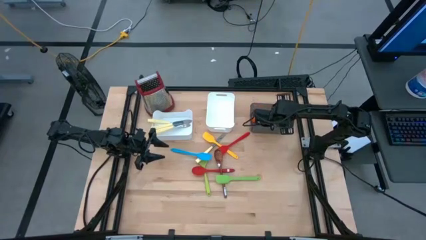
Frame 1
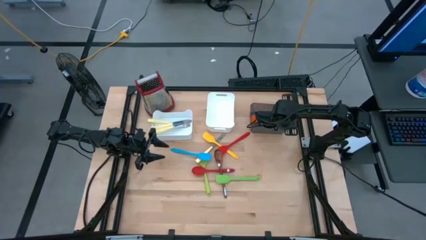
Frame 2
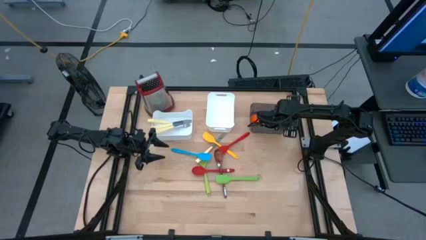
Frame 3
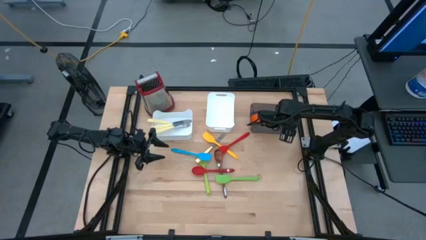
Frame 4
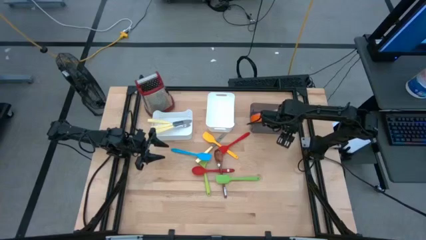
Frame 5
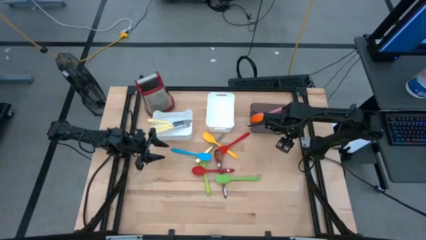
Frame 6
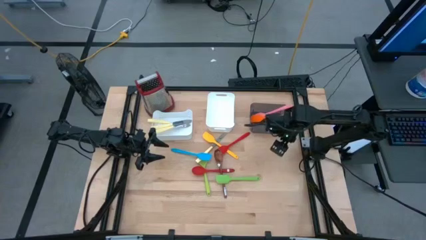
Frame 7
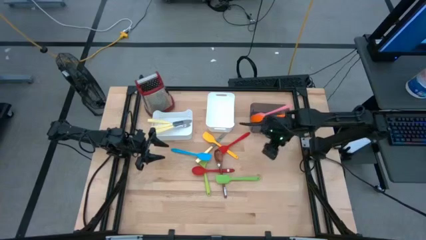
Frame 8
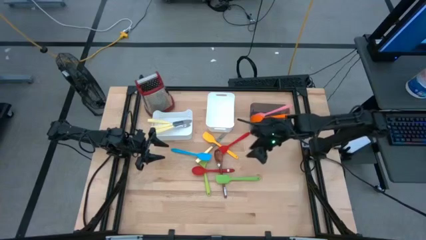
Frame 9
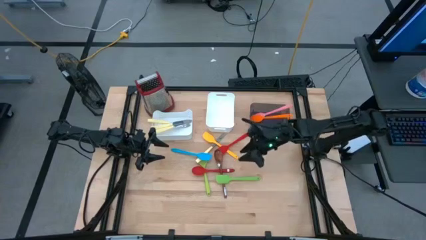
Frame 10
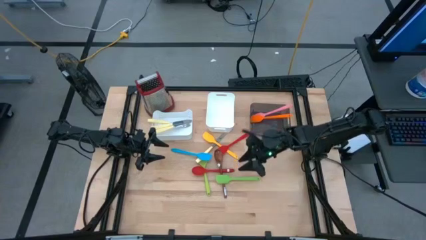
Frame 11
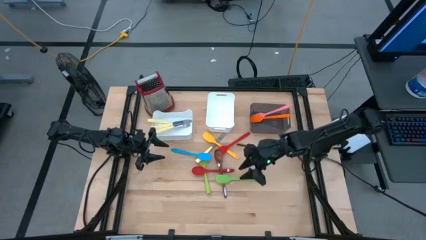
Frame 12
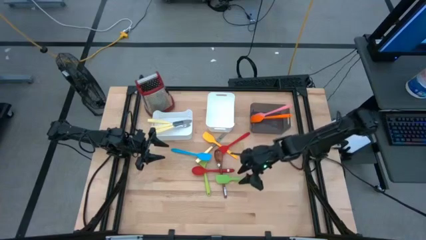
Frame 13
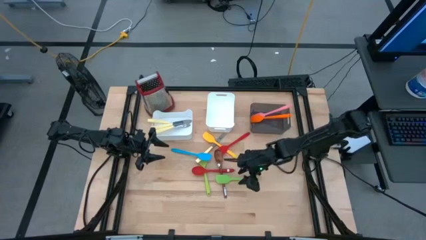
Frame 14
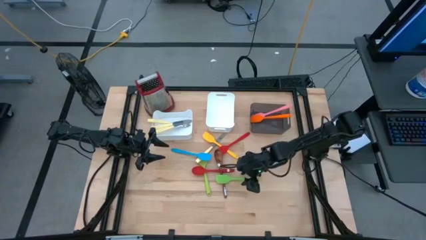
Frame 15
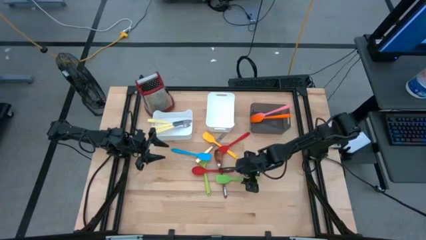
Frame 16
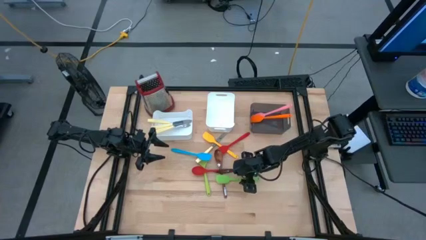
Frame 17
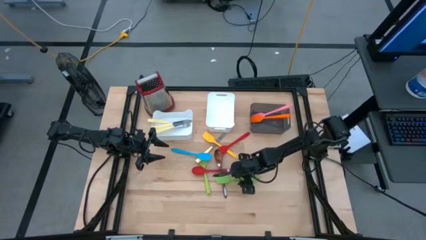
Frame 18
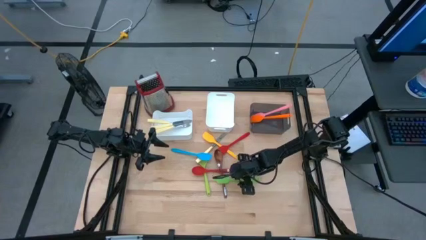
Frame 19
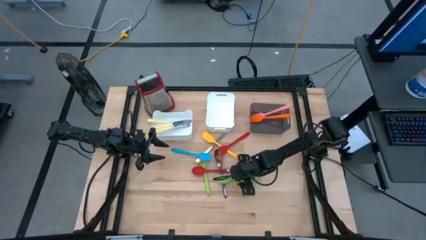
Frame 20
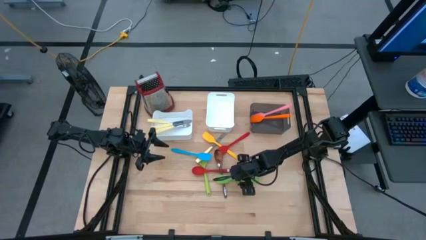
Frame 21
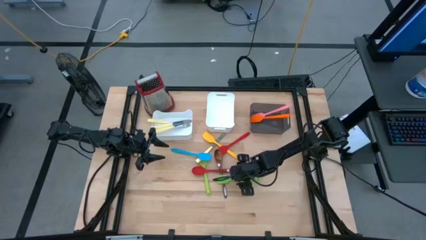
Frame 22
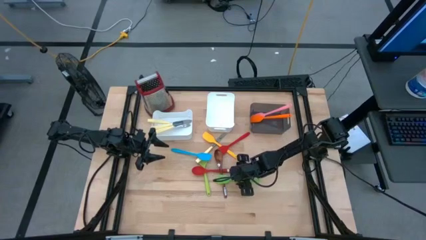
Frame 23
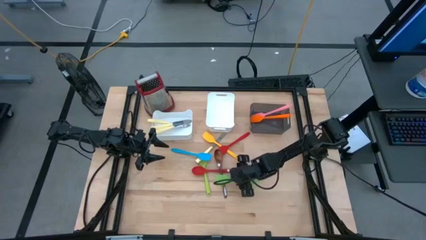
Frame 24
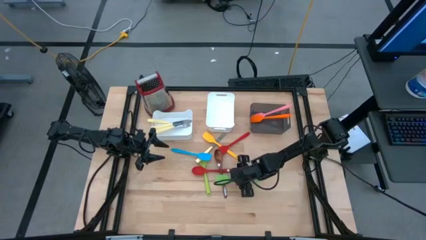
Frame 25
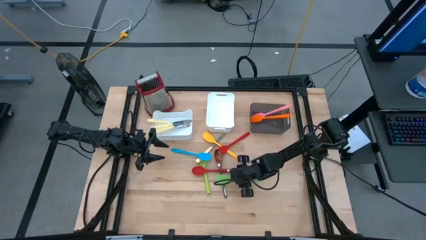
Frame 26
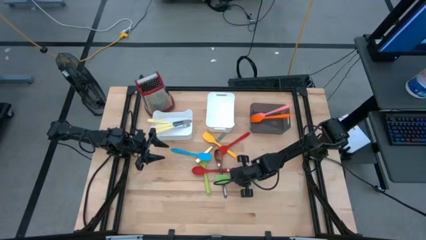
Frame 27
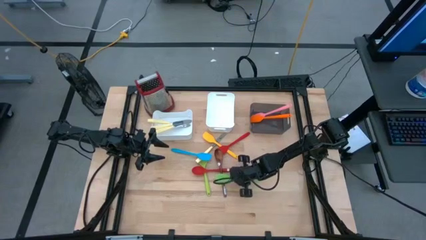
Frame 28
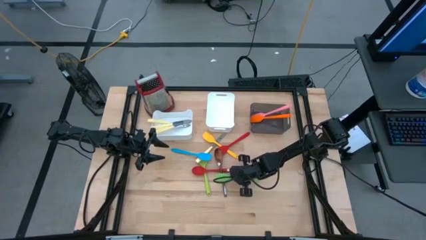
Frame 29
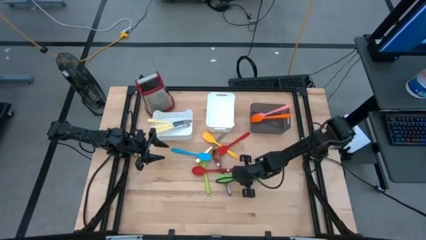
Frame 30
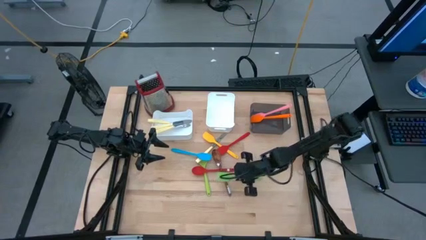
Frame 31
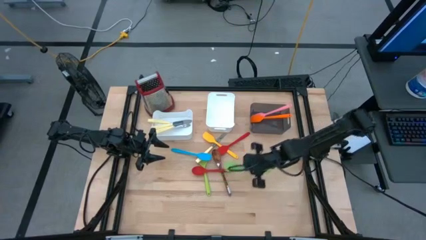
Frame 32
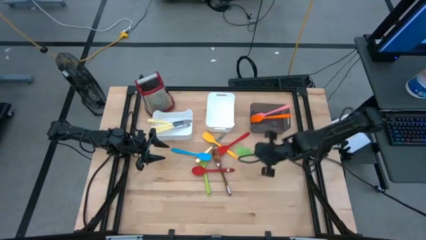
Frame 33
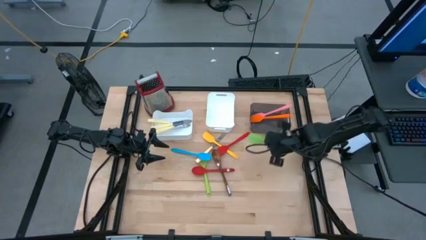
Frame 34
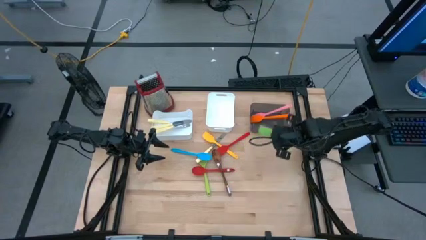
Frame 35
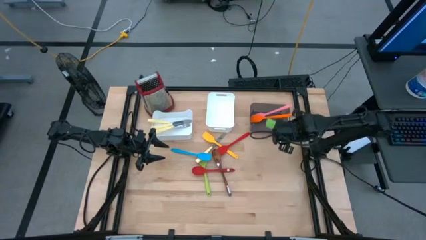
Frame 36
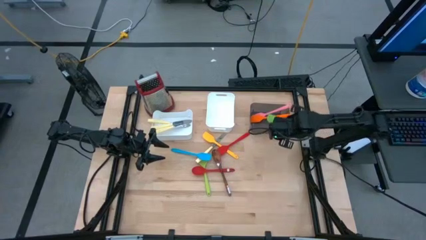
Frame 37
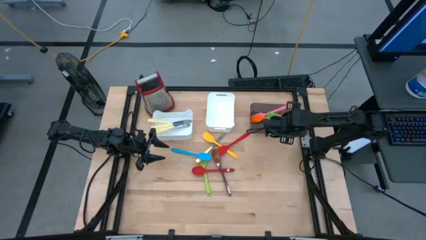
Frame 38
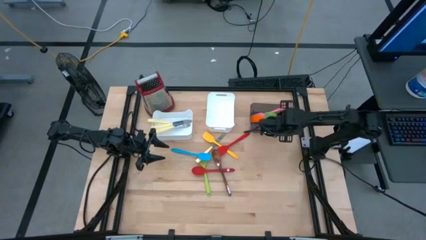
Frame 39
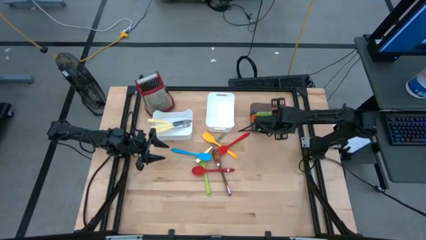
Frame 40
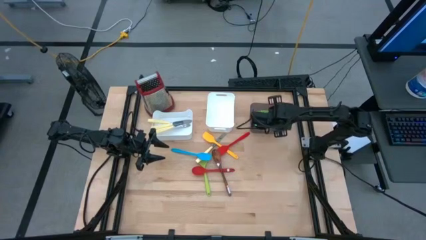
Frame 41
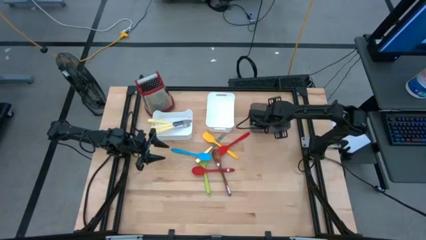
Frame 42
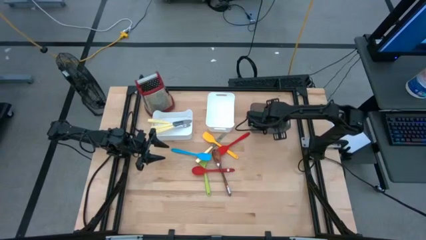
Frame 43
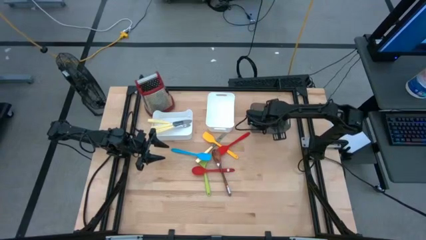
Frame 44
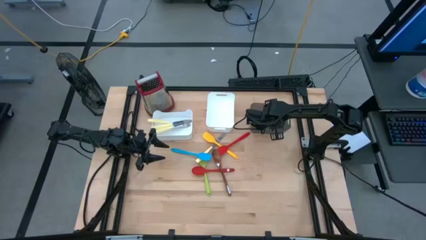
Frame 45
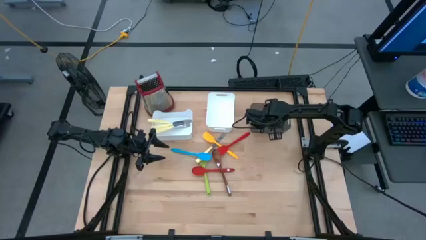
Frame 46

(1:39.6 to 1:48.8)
Task: Pick & Place Kitchen Items
Put the green spatula into the black bin
